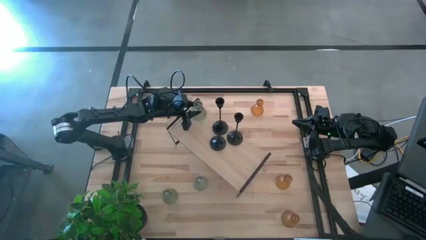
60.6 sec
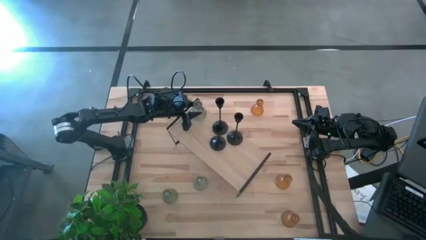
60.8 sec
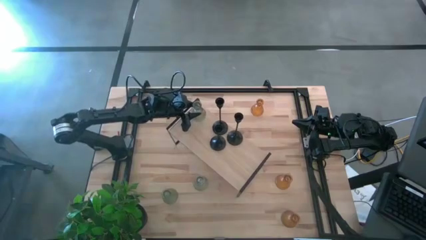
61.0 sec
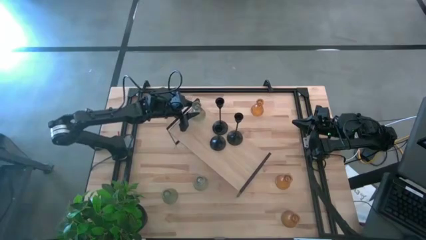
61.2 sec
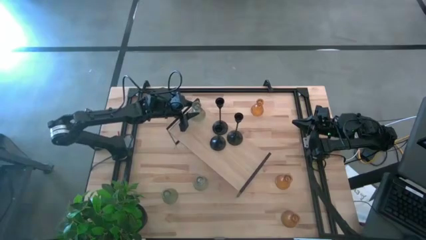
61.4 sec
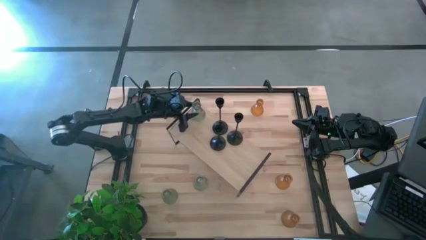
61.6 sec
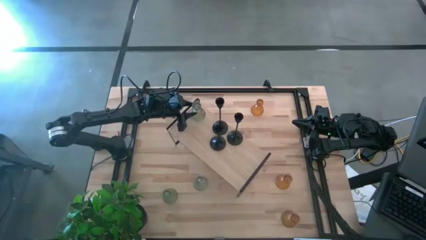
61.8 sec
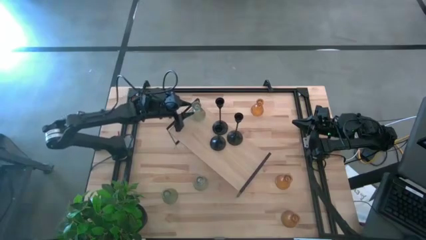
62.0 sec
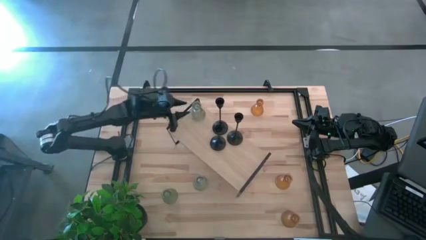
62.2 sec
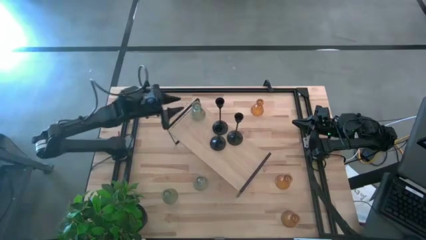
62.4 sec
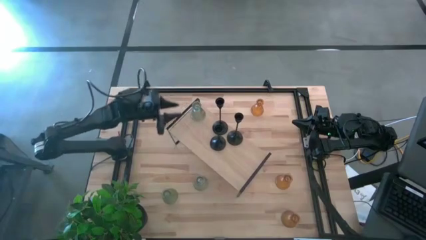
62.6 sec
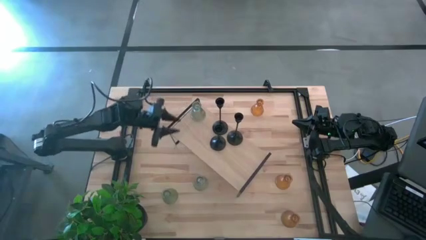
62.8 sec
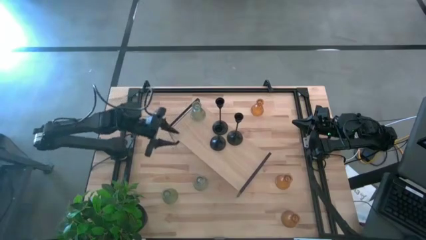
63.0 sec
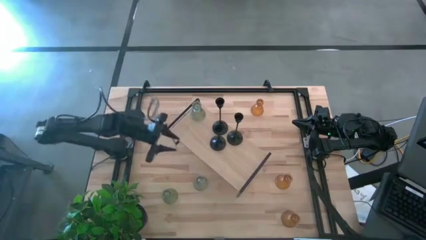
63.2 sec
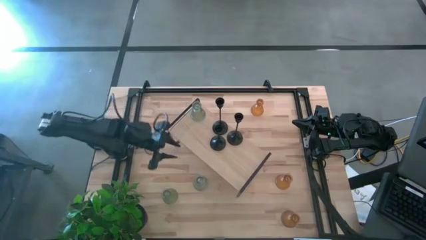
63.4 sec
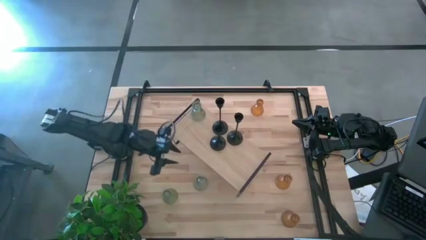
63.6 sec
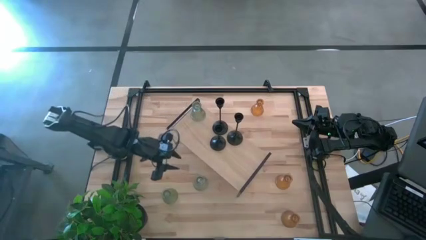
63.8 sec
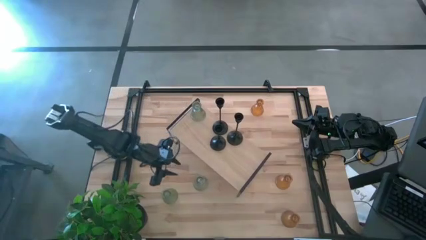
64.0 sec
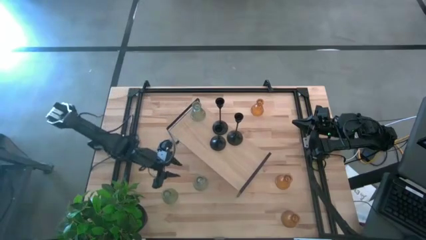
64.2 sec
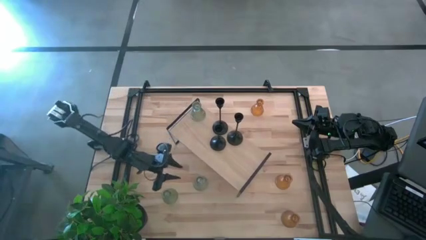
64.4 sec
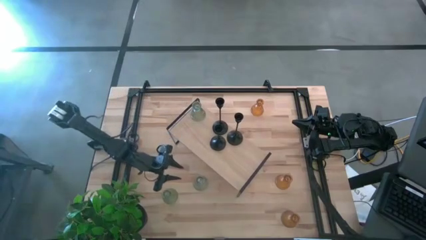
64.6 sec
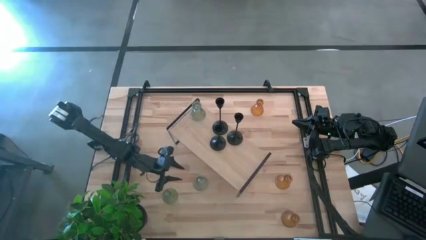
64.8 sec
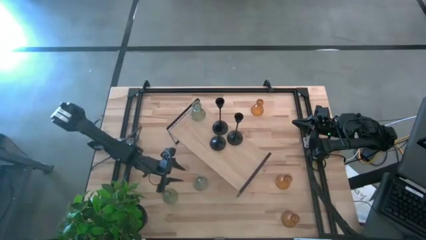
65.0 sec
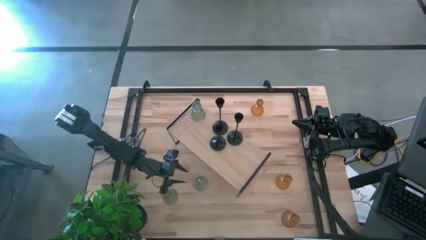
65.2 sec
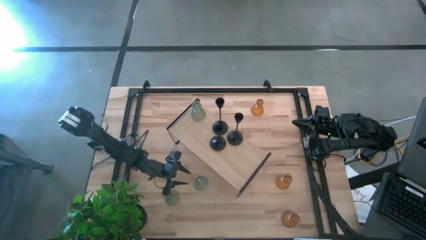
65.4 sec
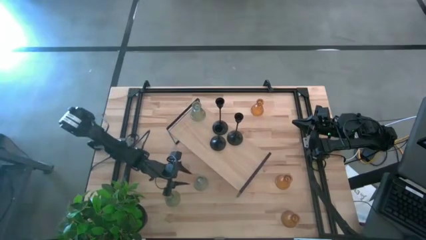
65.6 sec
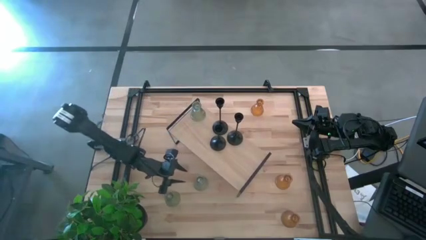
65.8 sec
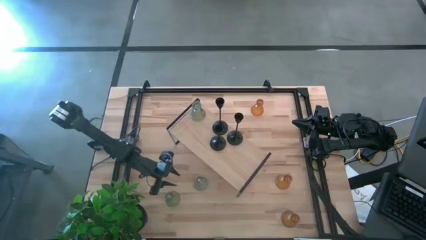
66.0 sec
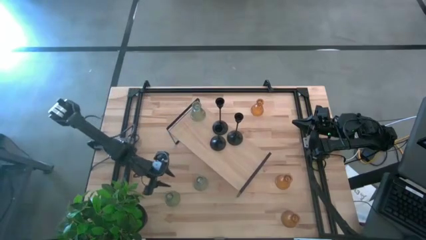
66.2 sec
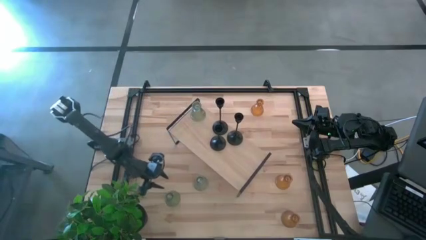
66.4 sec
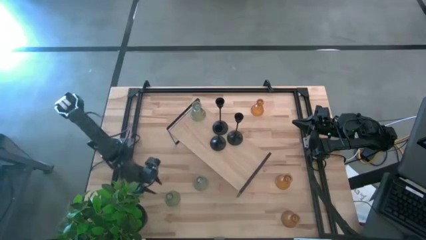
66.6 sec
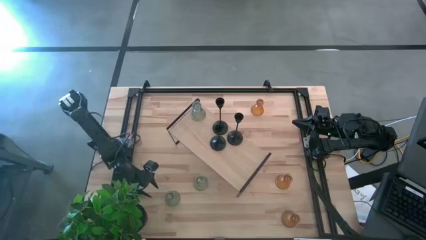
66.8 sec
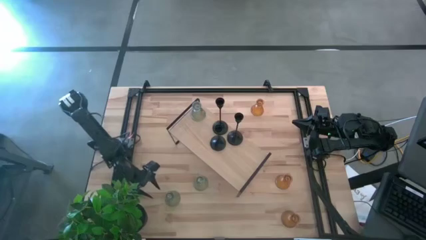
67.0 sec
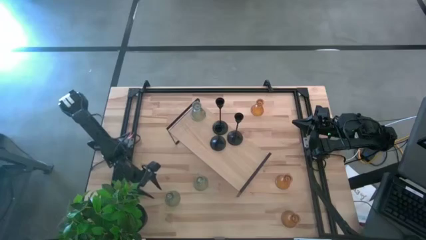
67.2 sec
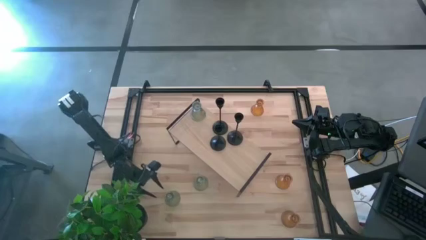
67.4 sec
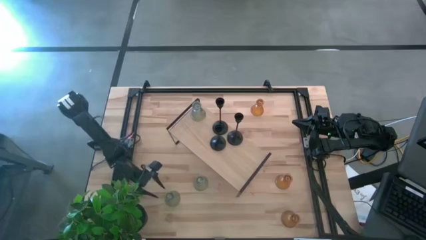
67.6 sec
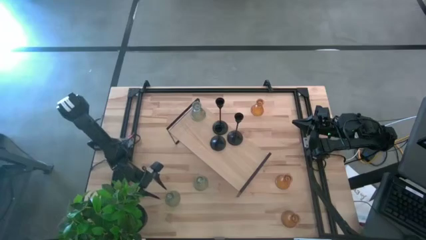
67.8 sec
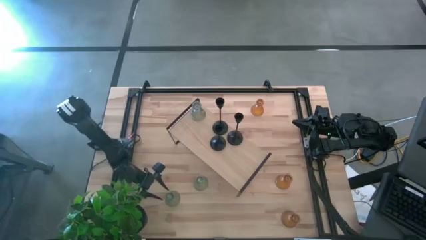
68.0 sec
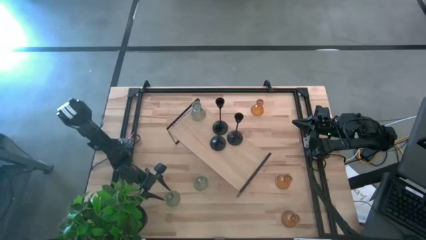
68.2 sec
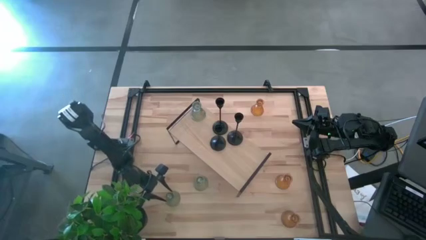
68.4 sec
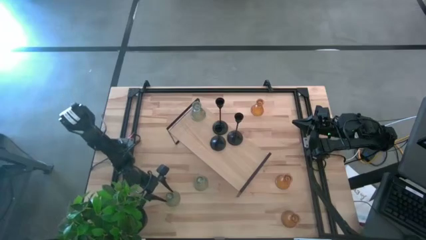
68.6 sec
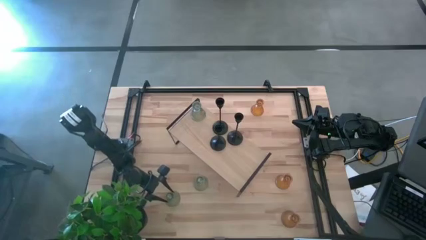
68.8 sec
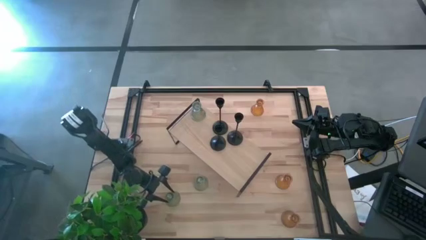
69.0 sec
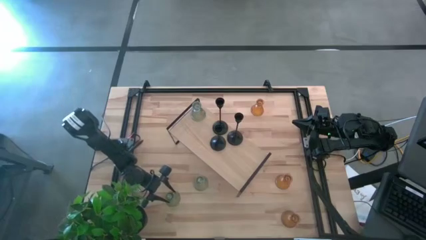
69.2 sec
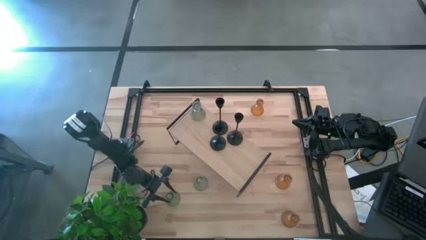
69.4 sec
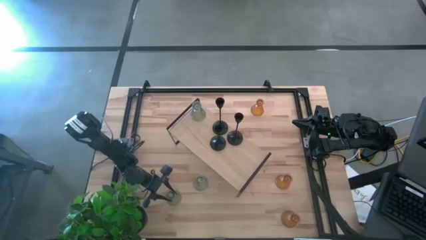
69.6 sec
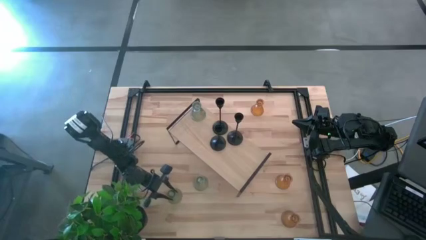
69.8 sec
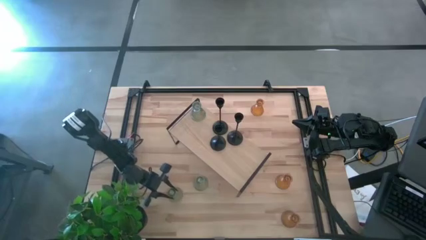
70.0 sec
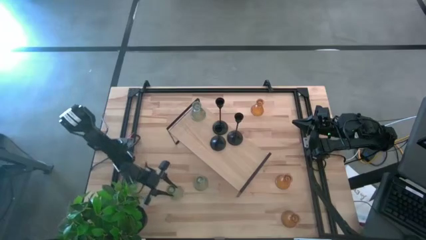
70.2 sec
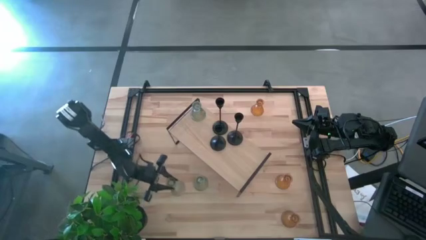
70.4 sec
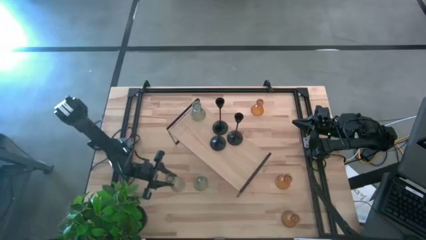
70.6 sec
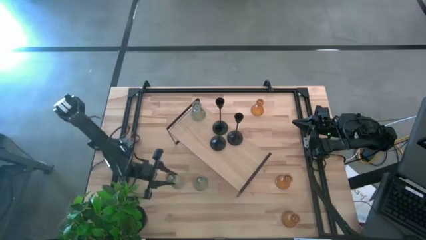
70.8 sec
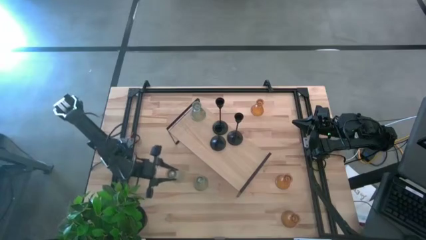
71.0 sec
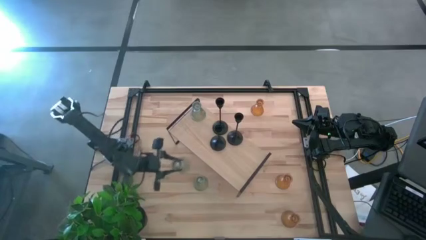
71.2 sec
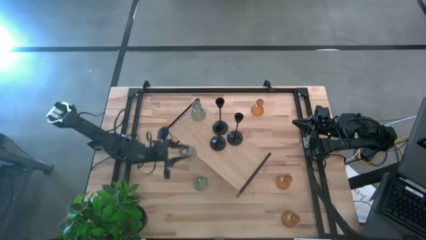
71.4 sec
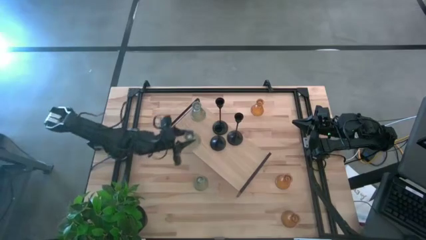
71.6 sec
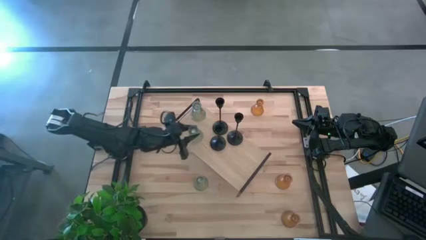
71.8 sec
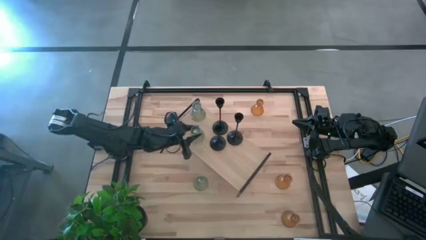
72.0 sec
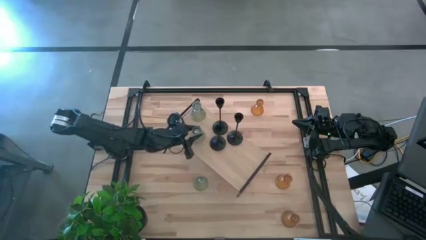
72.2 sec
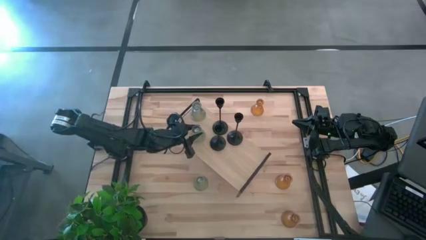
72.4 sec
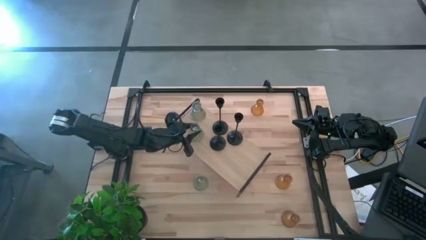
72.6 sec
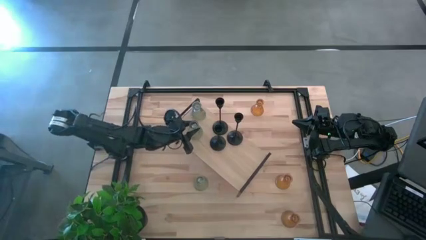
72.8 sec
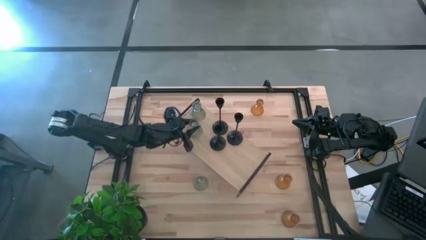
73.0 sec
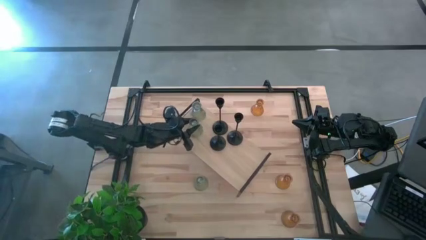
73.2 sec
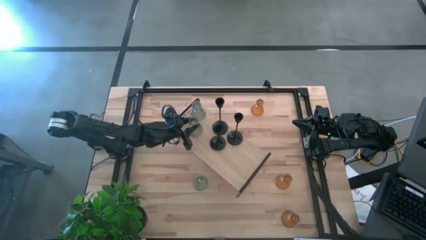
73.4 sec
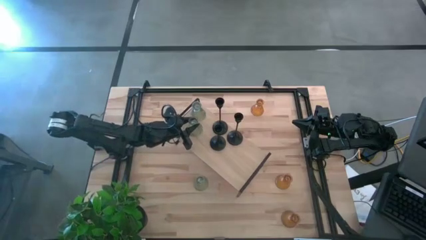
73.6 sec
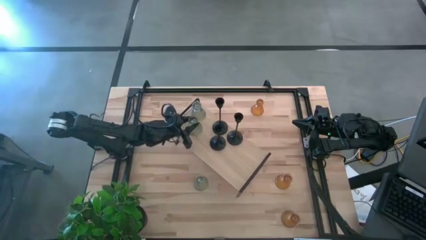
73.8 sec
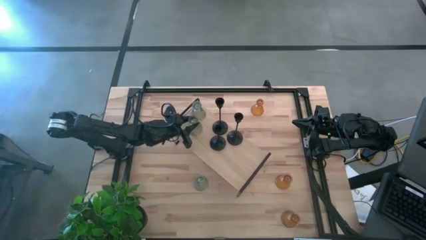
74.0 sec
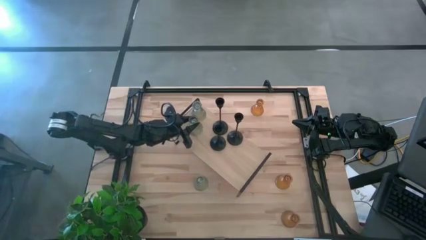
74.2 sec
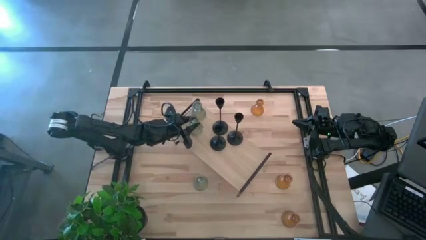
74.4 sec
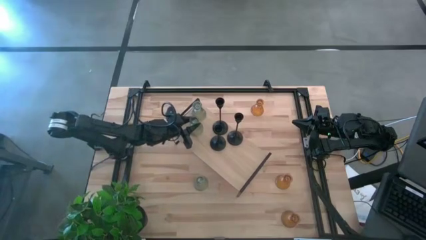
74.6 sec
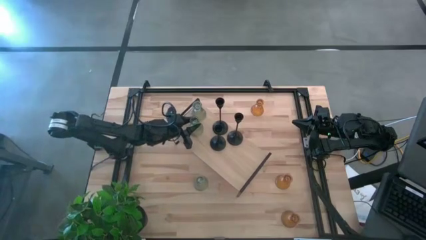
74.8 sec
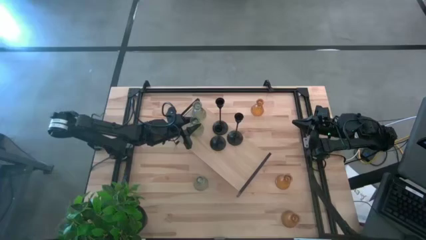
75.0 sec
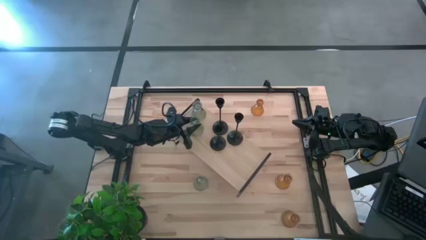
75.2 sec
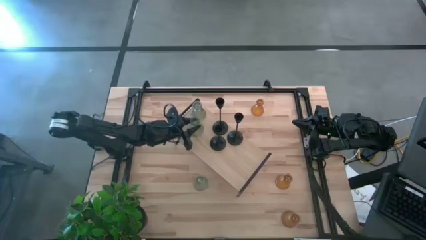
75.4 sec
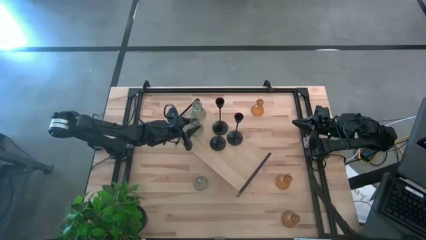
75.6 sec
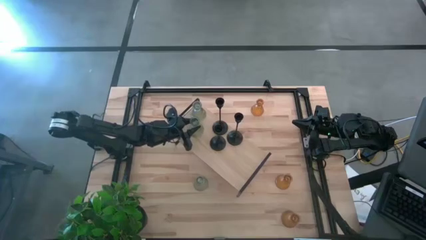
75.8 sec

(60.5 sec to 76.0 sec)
Task: Pick & Place candle stick holders
Put the left transparent candle holder on the shelf

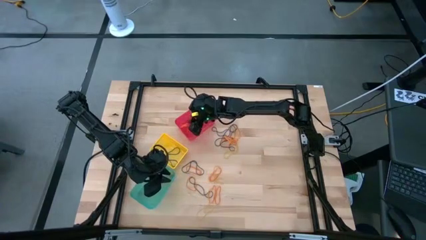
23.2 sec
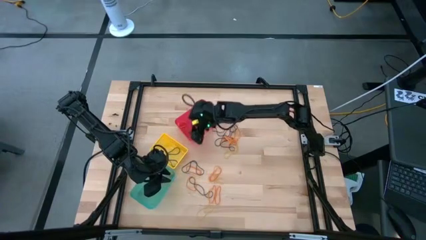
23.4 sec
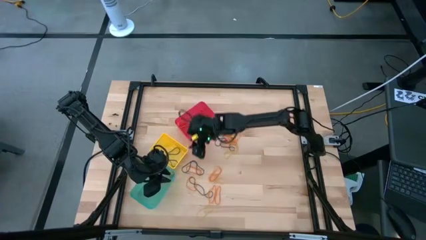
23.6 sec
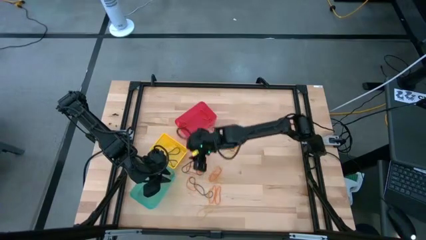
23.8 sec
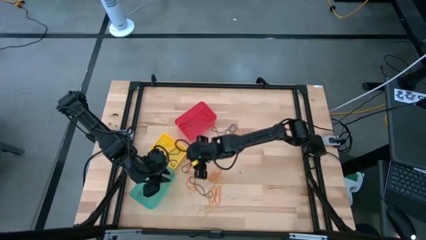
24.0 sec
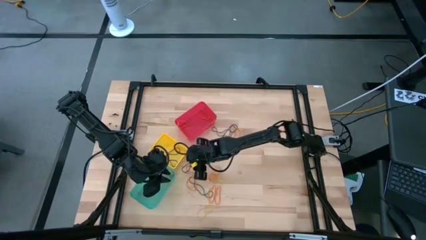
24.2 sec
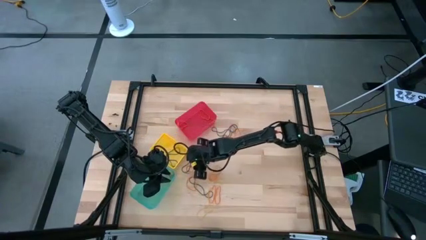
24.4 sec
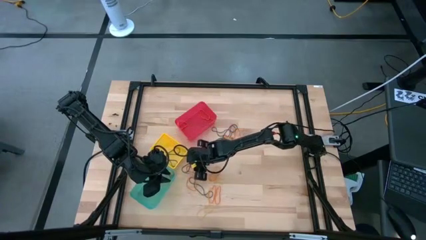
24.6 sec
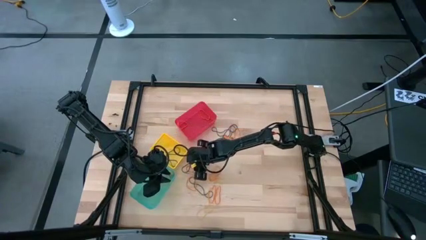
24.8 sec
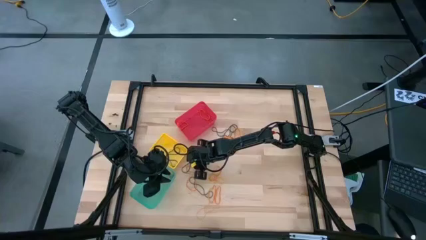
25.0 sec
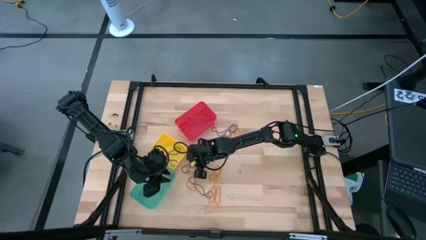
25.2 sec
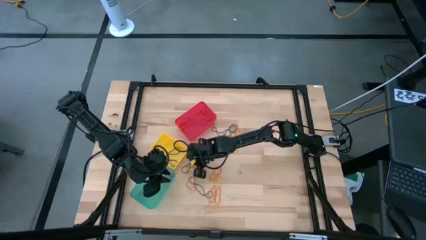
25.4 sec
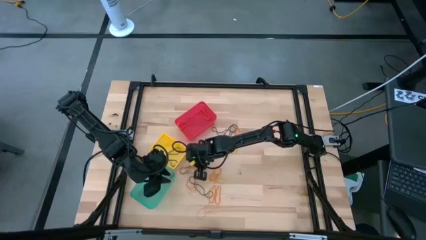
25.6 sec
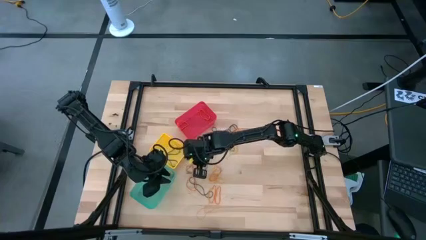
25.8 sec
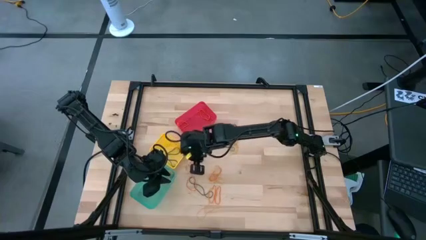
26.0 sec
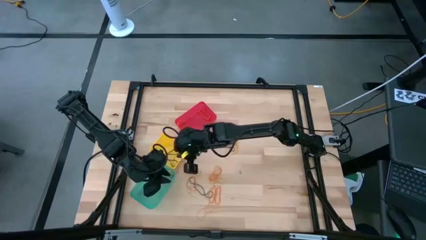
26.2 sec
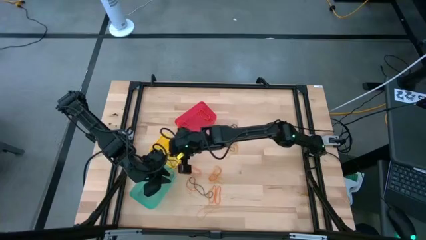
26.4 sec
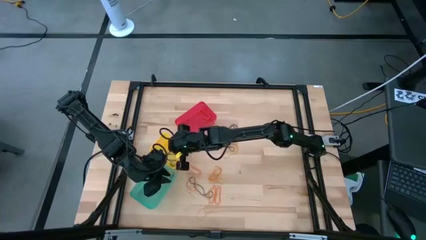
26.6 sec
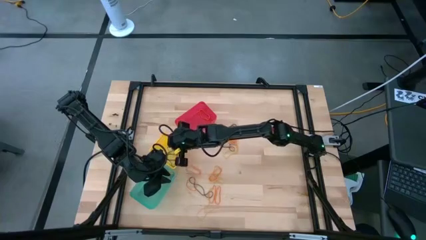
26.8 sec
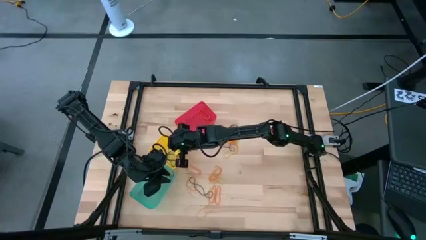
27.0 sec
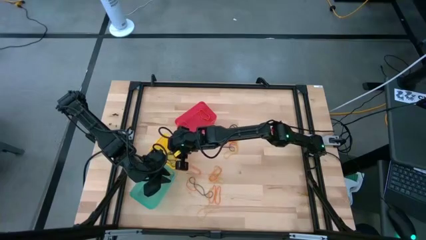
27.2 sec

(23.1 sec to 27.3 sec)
Task: Sort rubber bands into baskets
Put the black rubber band into the yellow bin
